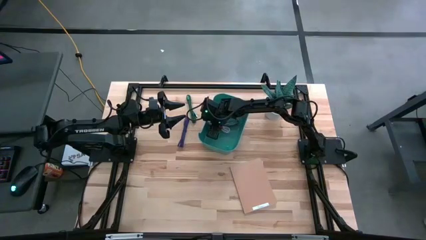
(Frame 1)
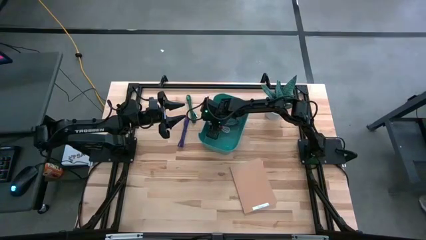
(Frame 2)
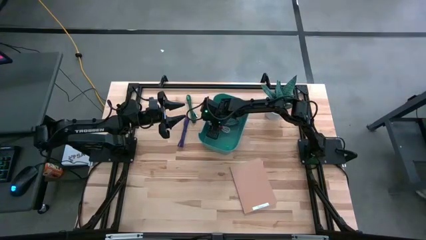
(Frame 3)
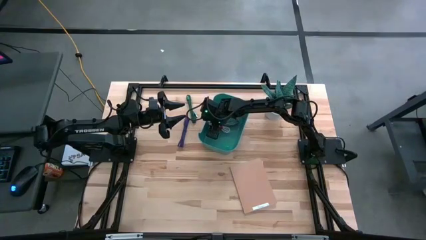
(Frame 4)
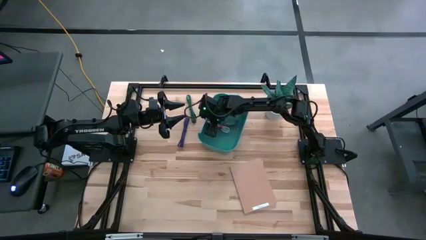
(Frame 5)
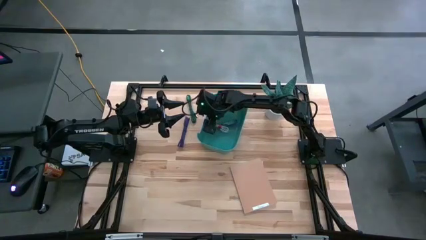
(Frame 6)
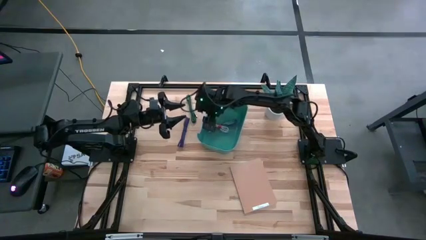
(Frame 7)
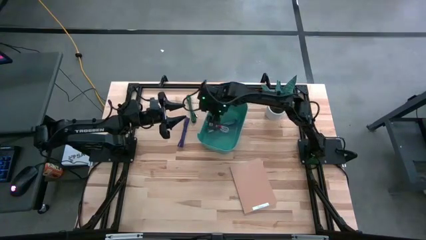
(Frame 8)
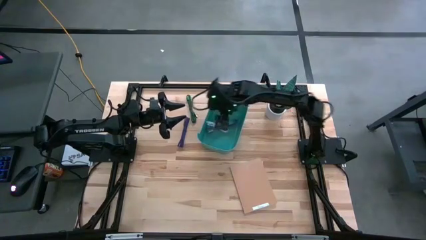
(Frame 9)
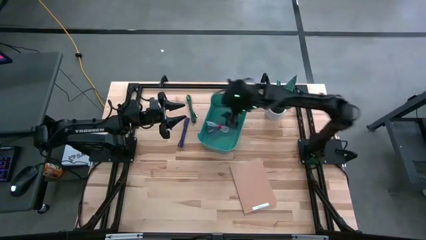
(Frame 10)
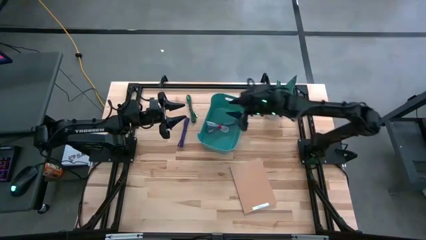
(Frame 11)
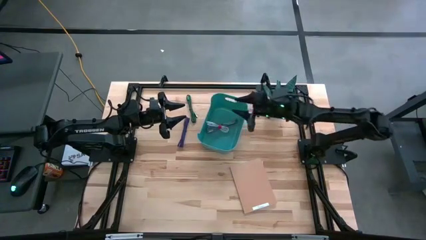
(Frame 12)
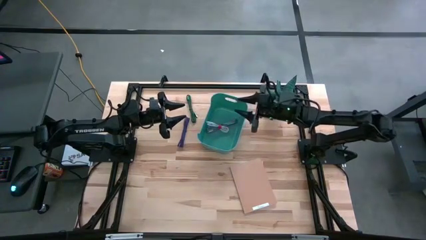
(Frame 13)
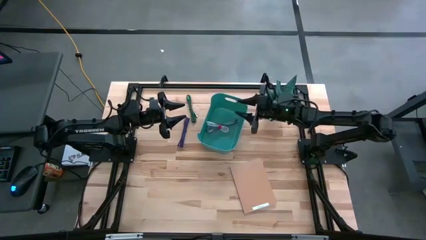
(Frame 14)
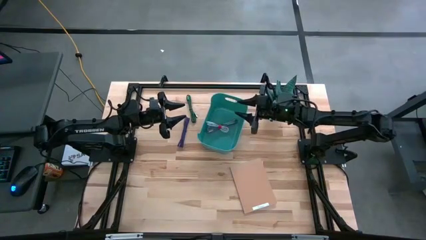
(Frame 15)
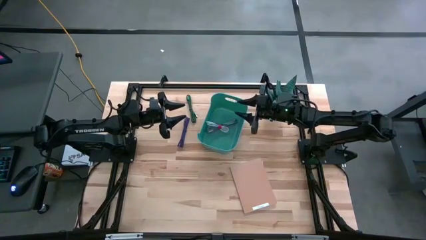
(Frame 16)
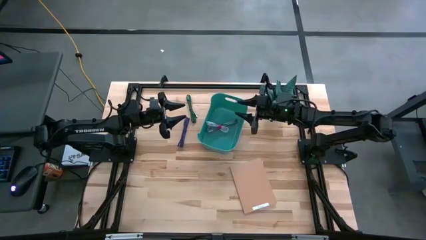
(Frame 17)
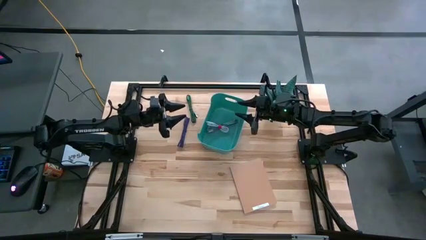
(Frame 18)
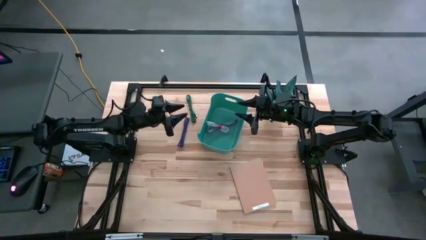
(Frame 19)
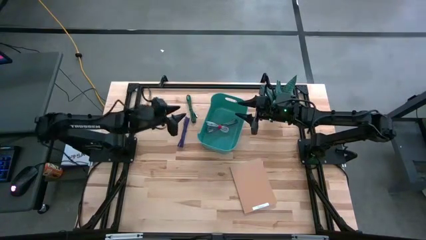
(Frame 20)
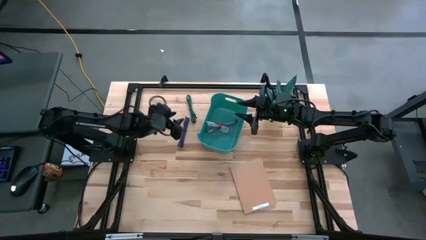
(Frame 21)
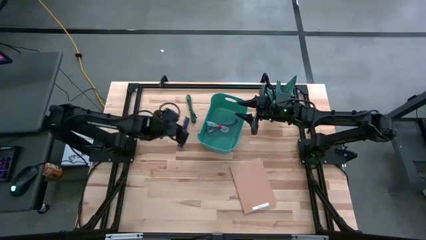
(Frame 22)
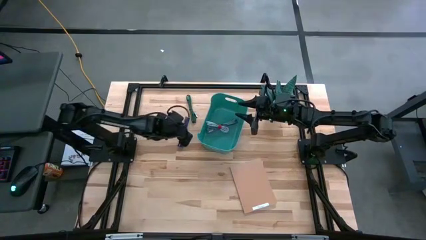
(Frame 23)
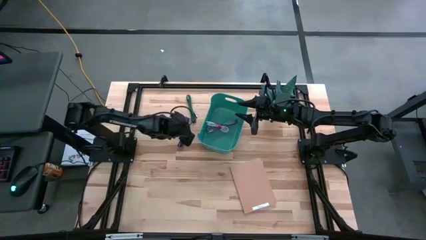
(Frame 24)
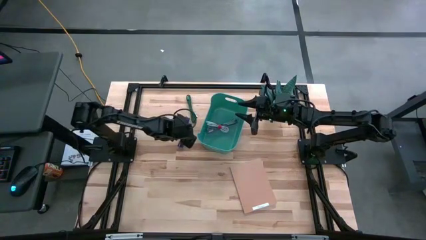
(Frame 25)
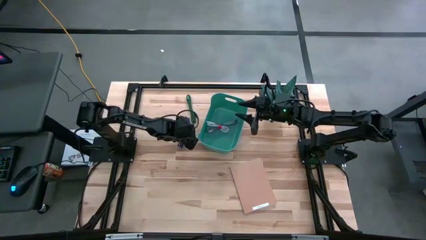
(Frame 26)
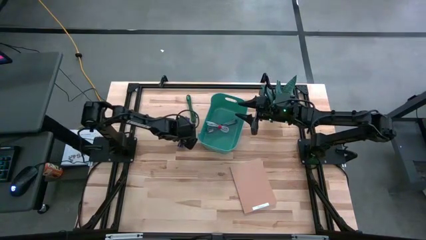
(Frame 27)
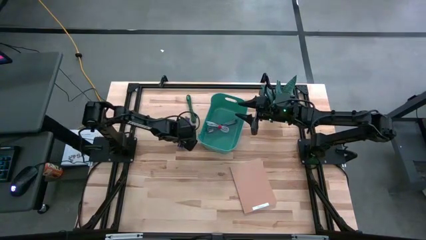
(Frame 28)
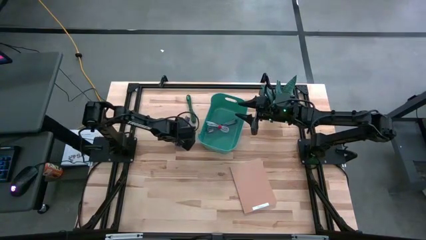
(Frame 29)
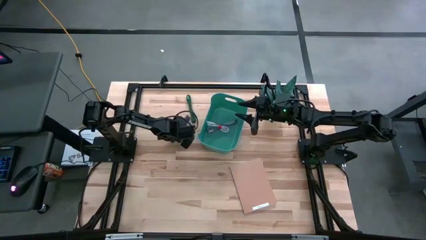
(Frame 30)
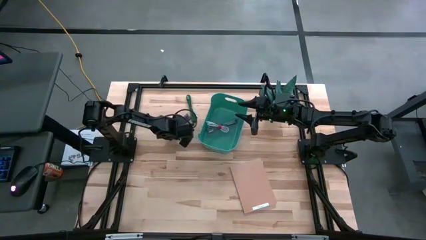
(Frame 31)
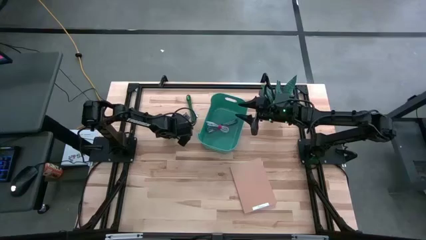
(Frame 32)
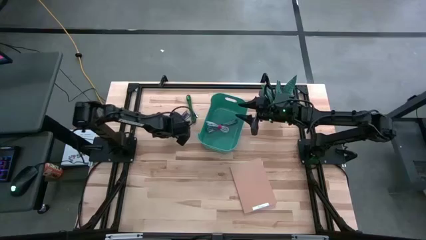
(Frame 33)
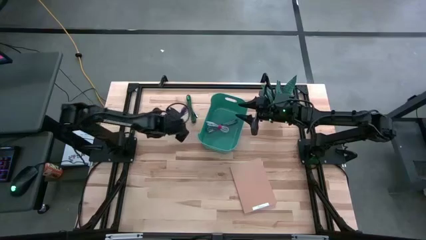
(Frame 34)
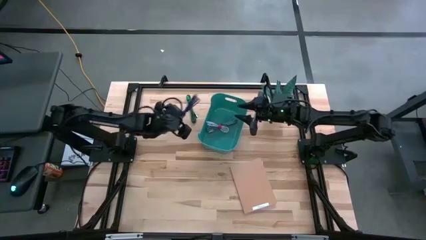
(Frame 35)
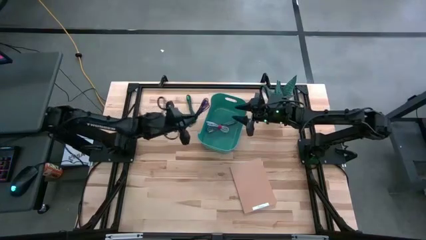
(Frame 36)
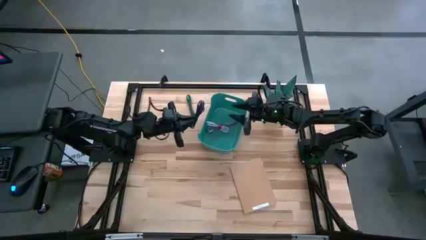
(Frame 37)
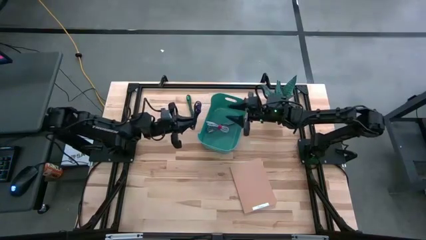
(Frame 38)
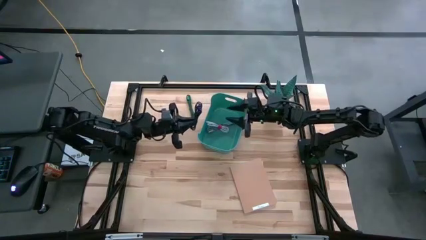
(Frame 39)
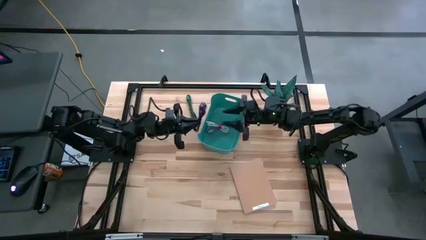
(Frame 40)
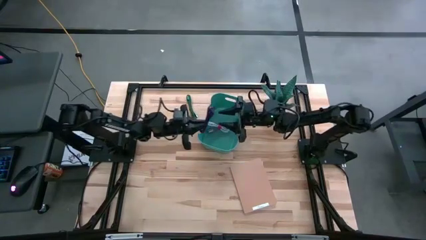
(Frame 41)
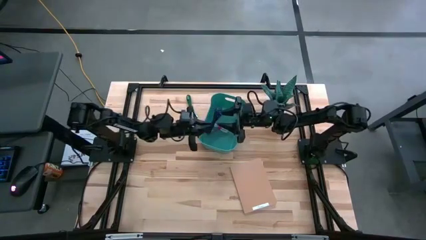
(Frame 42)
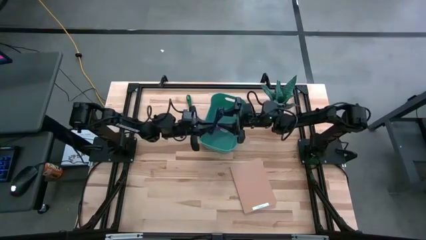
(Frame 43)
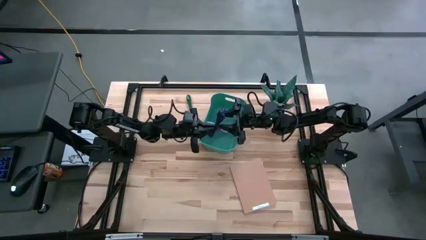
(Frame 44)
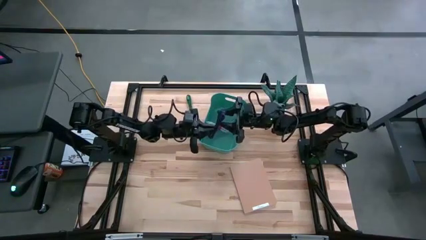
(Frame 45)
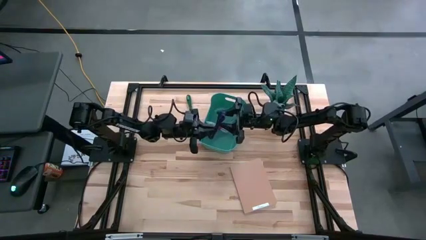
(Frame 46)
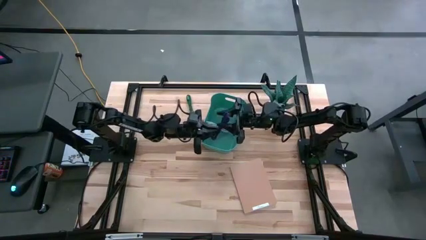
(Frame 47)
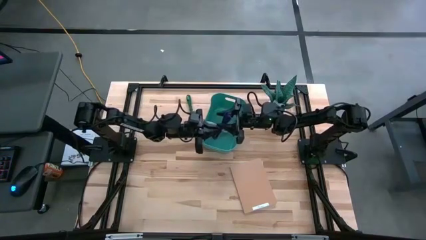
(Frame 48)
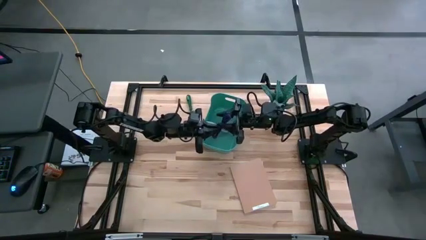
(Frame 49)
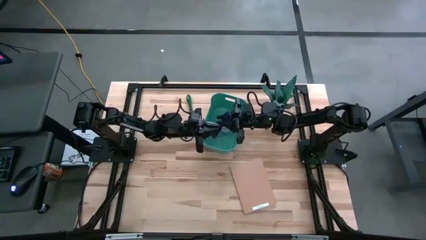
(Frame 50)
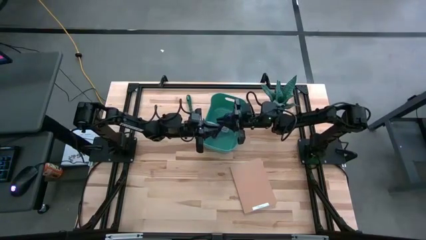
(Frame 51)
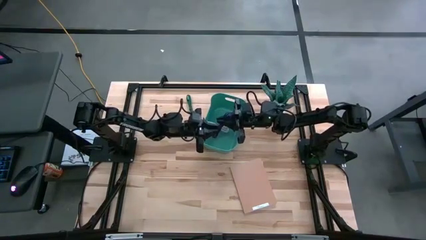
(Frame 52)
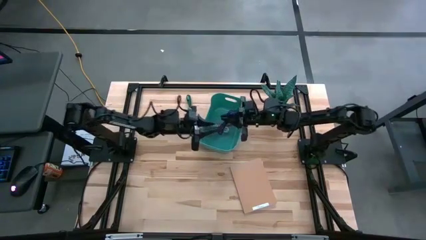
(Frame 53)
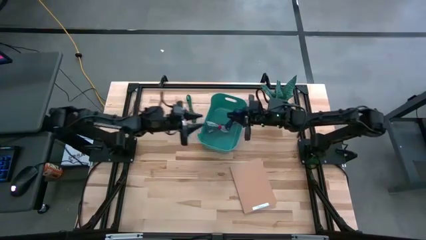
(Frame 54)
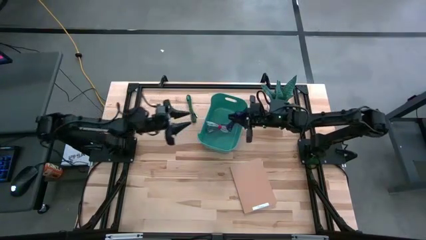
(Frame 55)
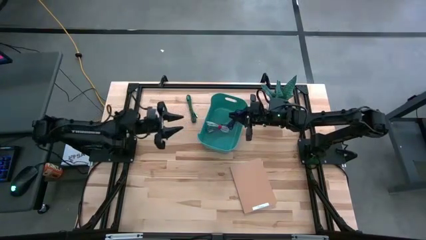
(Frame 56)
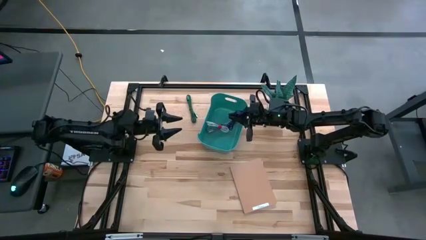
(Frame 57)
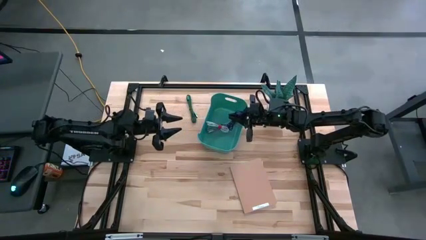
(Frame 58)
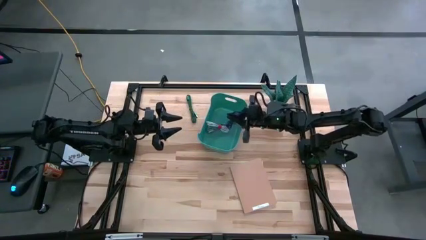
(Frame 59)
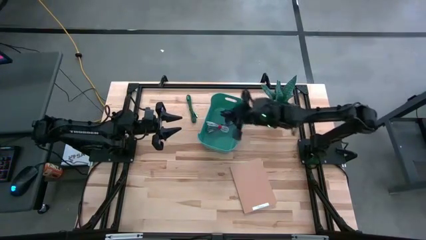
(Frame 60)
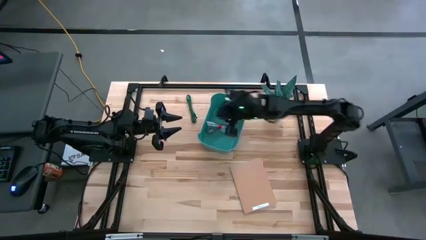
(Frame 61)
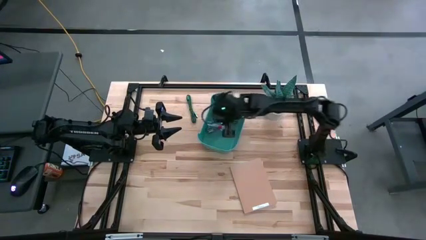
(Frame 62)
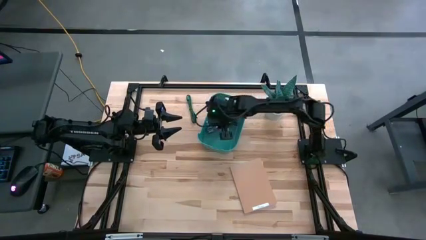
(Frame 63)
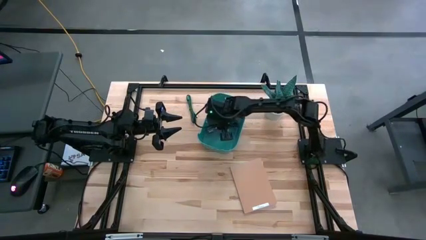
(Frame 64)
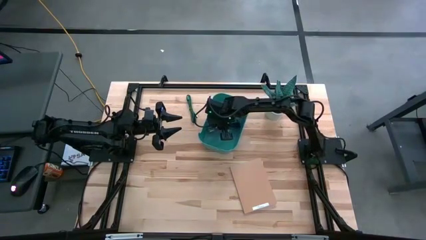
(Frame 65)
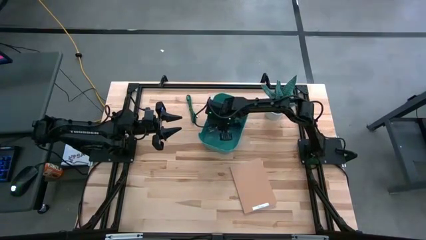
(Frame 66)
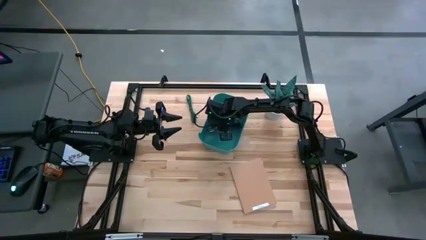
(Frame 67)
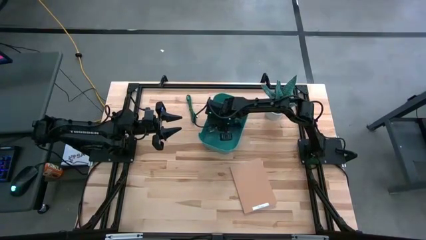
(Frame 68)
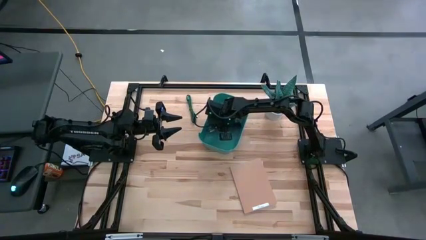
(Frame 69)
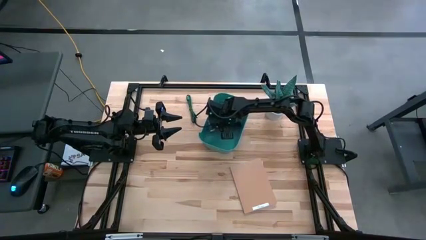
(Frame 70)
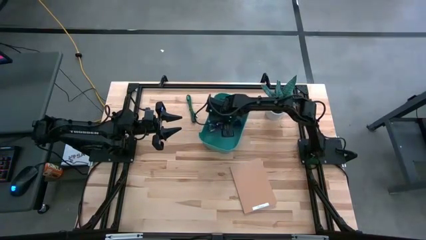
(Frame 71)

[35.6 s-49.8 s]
Task: Pick and place USB-C Cables
Put the purple charger cable into the green bin
